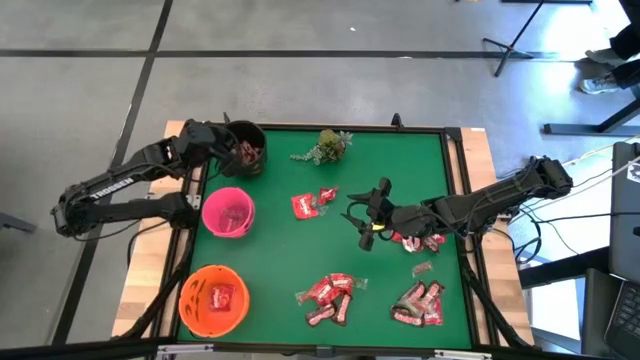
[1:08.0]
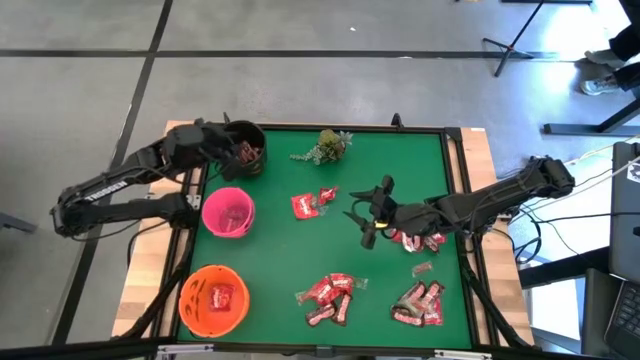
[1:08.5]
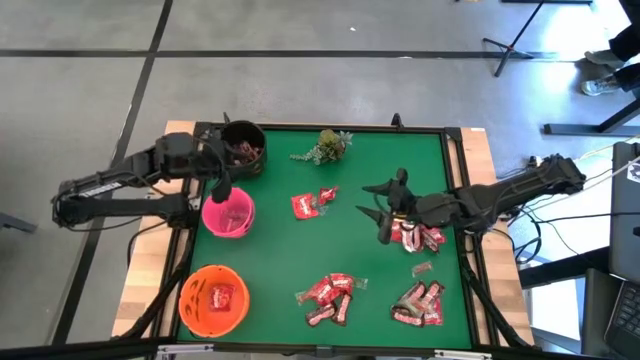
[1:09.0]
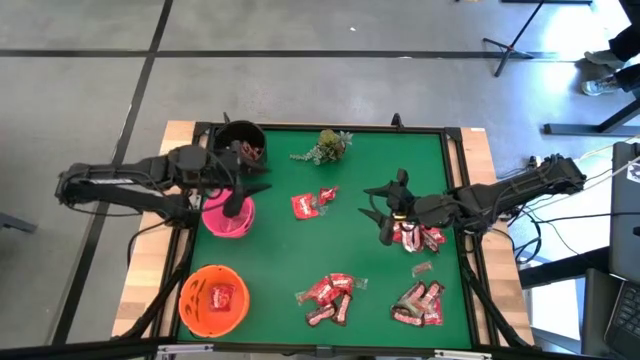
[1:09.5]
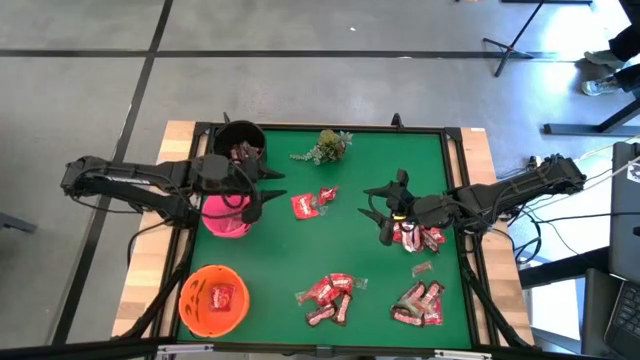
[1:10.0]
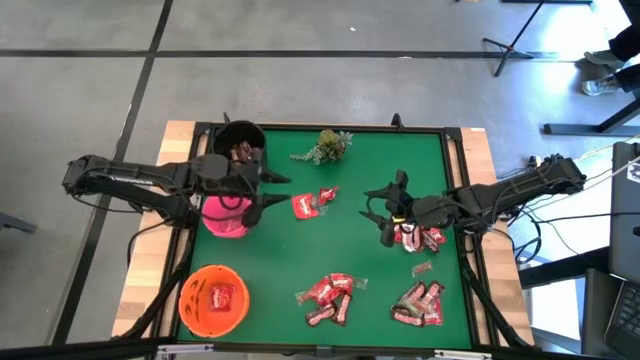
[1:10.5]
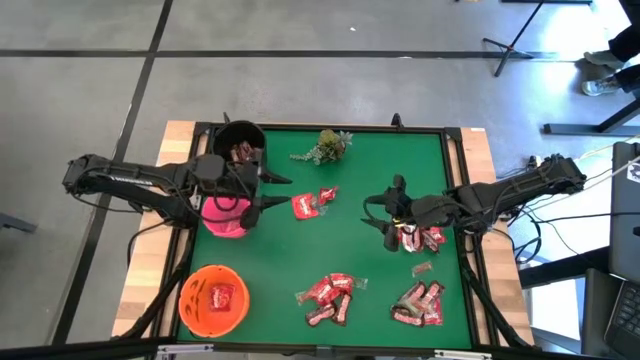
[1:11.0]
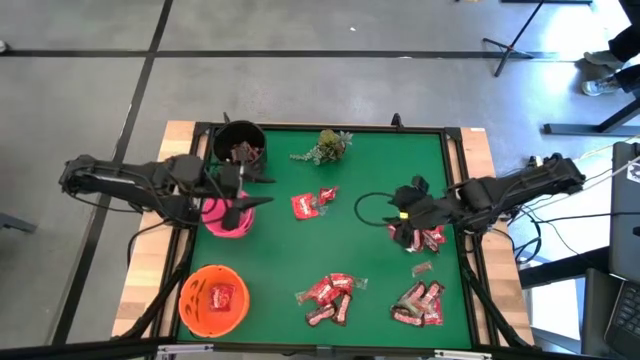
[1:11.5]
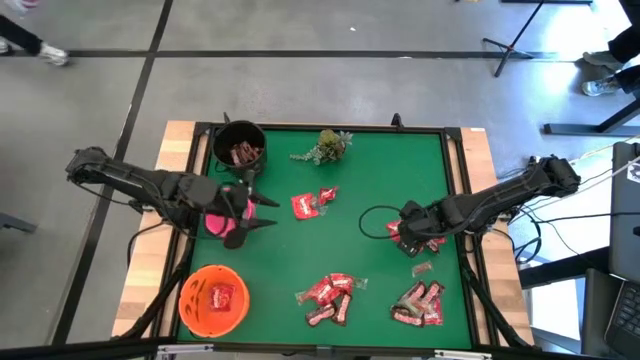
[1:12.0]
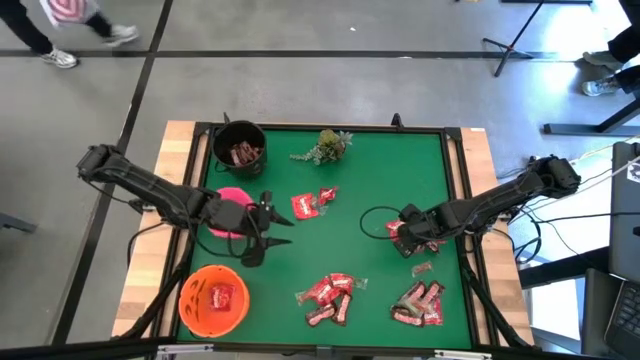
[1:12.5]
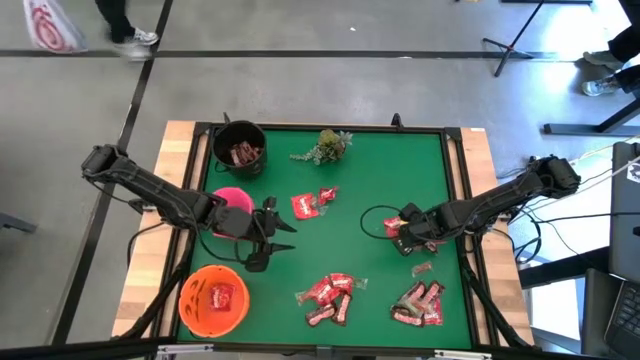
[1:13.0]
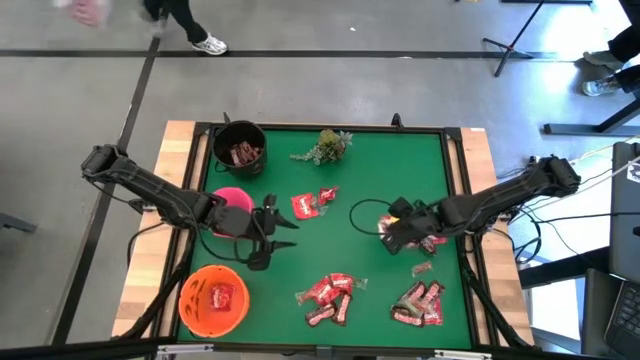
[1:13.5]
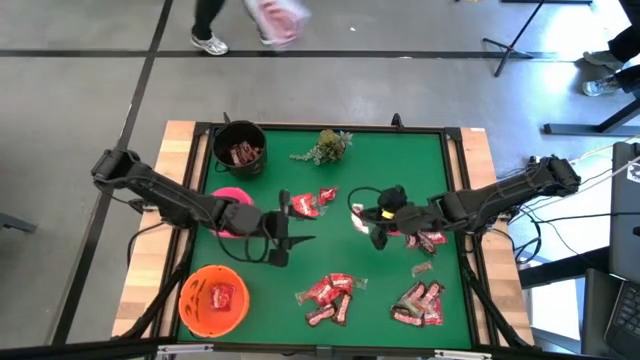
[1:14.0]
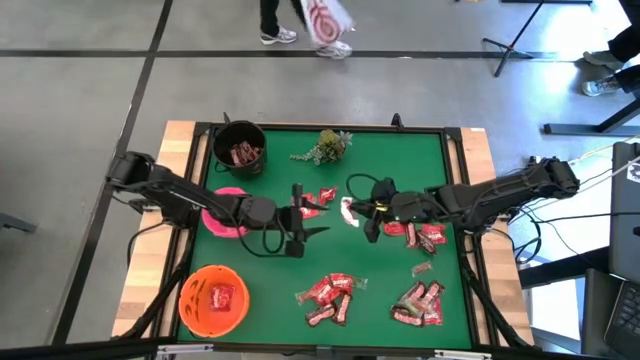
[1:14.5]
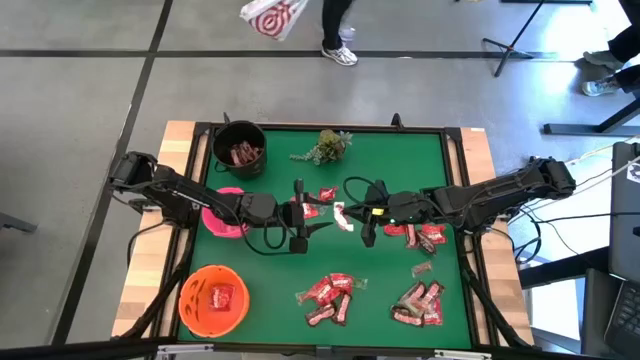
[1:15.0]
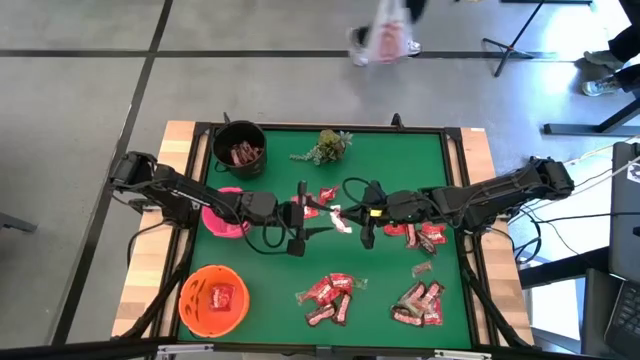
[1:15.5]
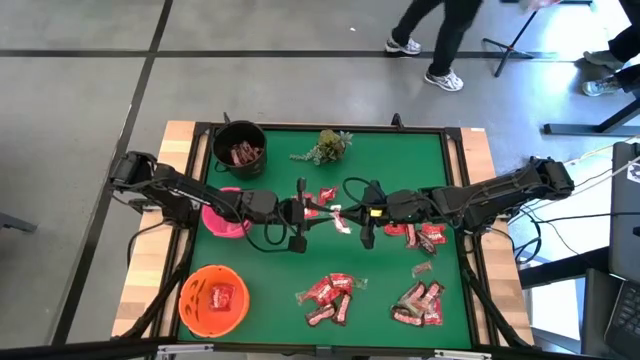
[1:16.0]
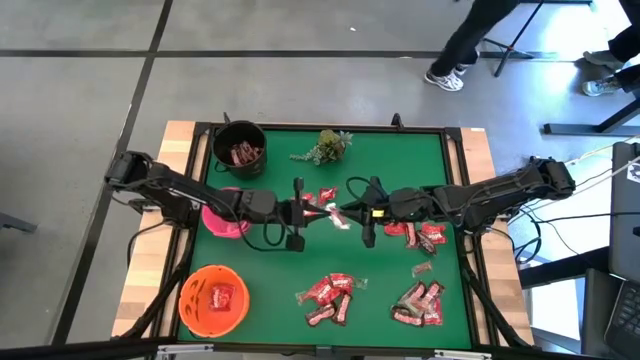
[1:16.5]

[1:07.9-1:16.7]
Task: Sort candy
Put the white chocolate into the black bucket

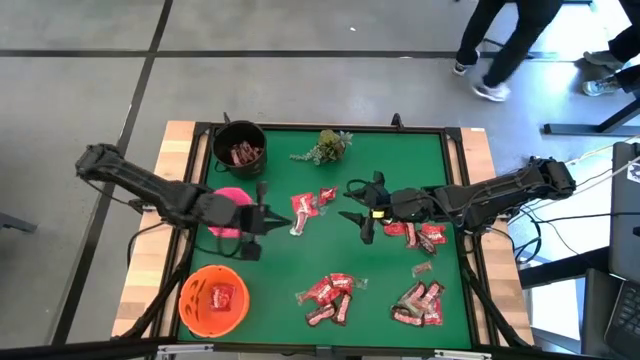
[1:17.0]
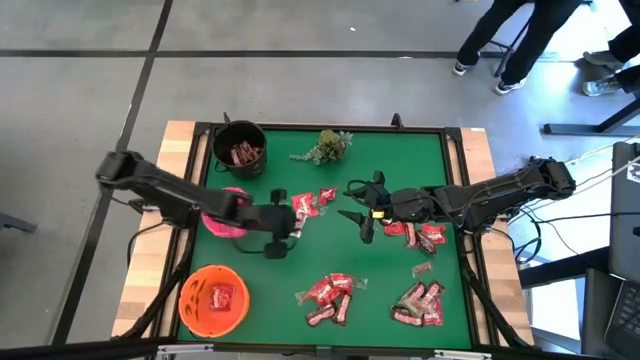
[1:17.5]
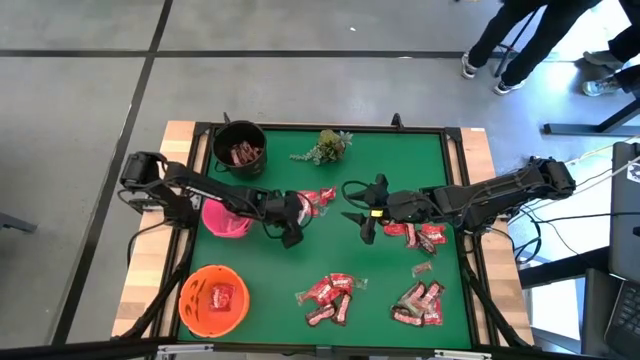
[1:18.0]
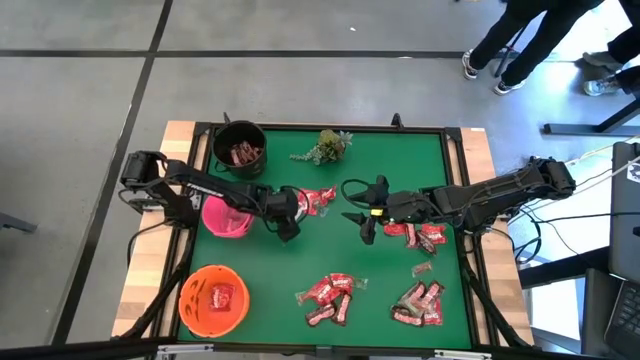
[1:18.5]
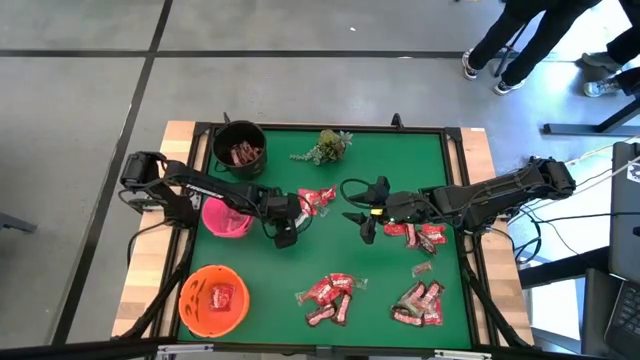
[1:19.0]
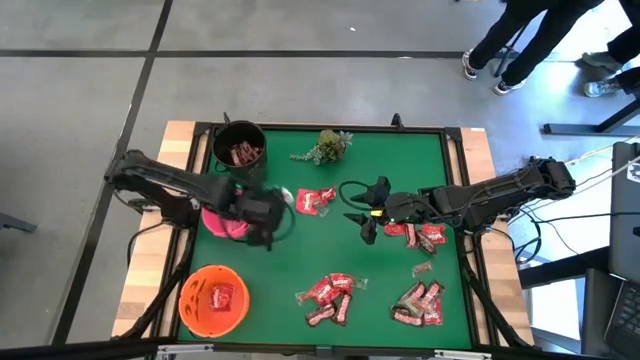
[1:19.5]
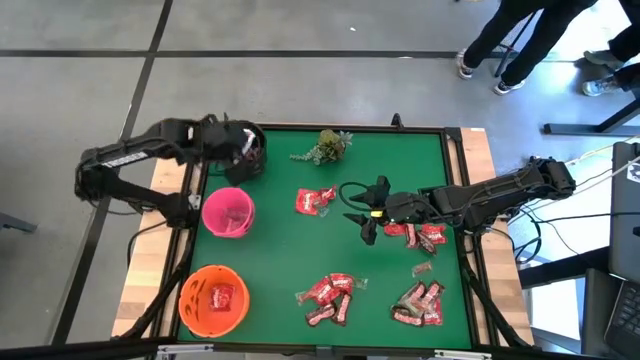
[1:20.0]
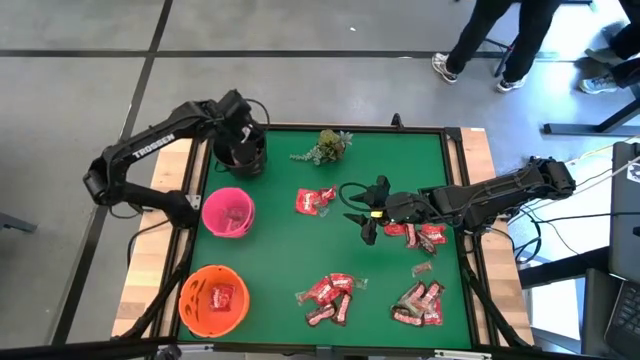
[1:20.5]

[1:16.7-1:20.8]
Put the white chocolate into the black bucket

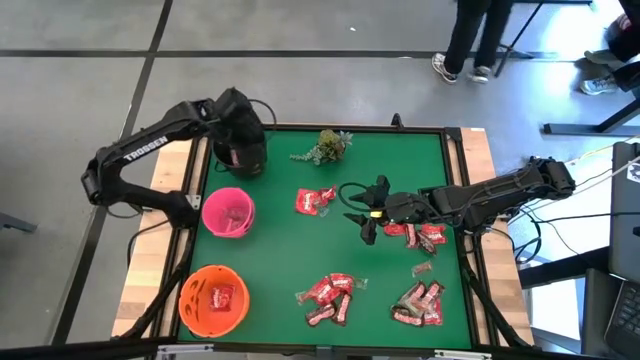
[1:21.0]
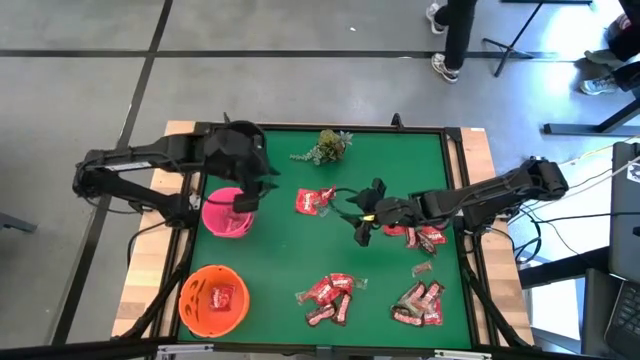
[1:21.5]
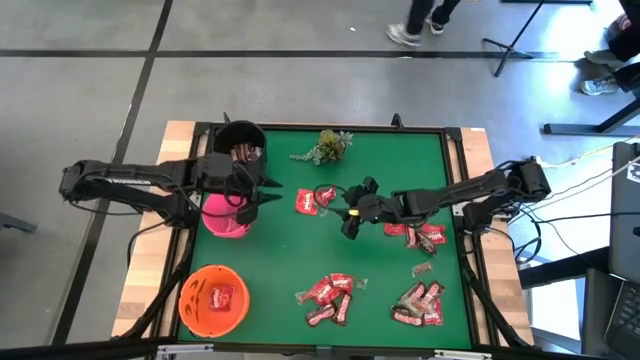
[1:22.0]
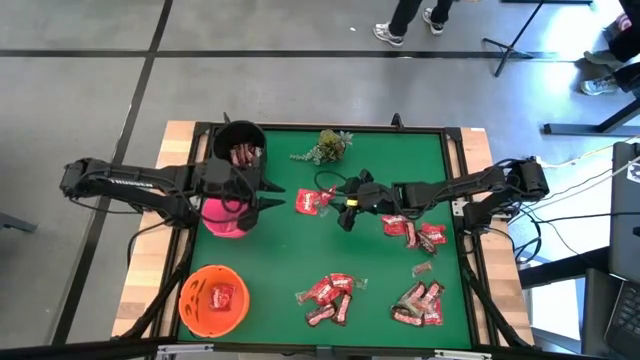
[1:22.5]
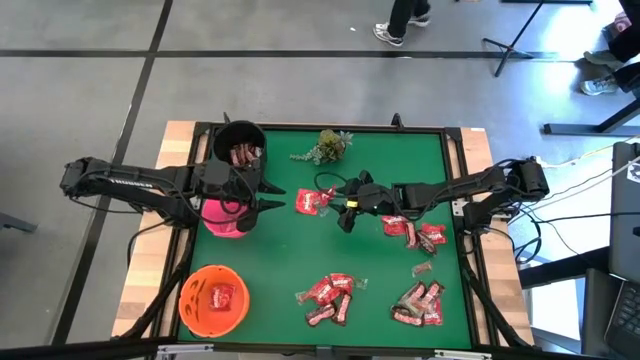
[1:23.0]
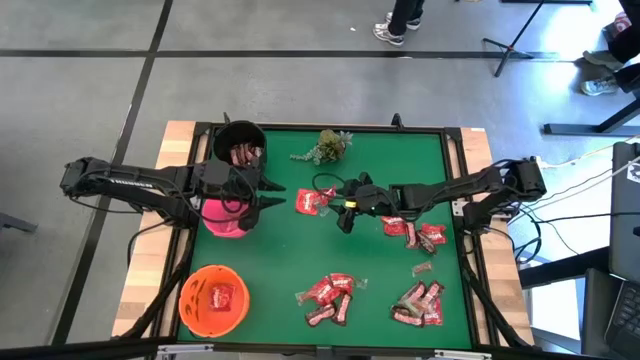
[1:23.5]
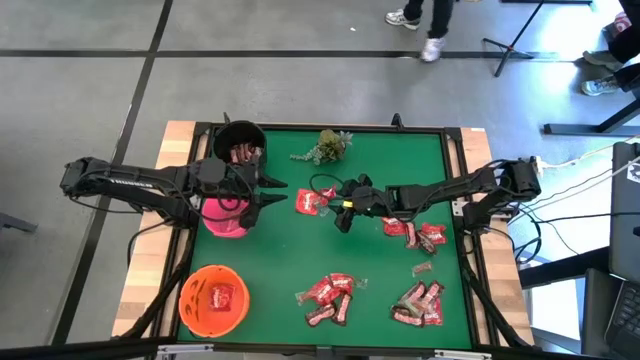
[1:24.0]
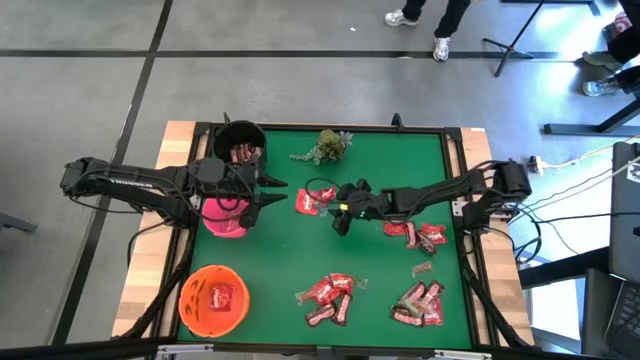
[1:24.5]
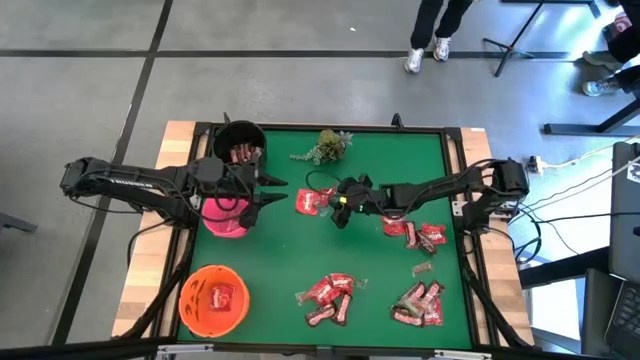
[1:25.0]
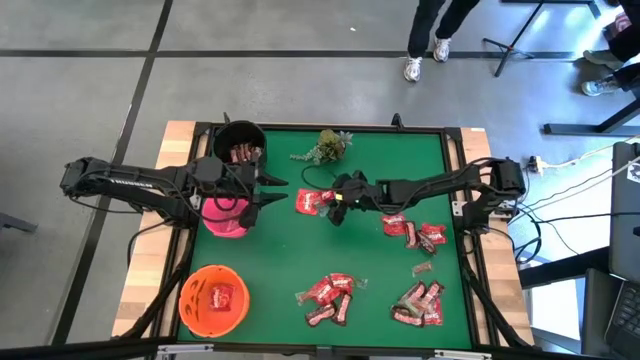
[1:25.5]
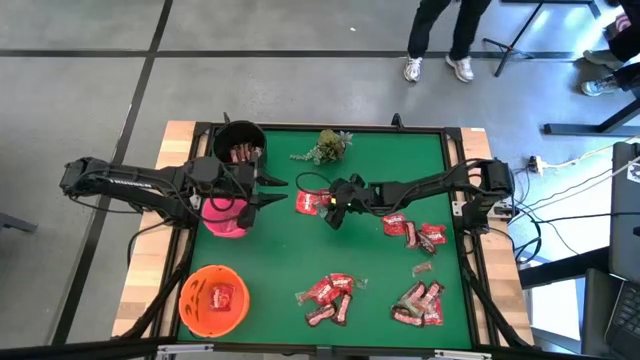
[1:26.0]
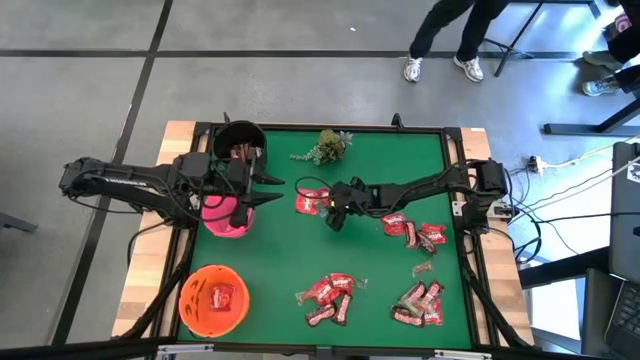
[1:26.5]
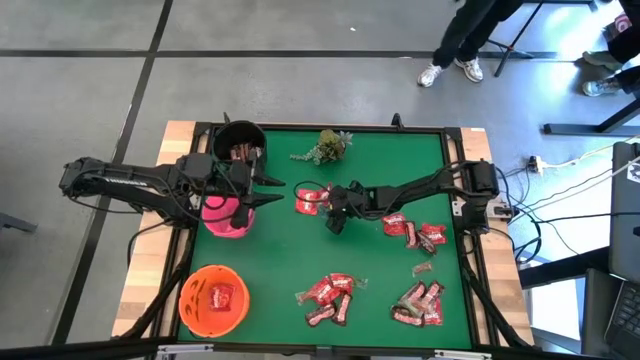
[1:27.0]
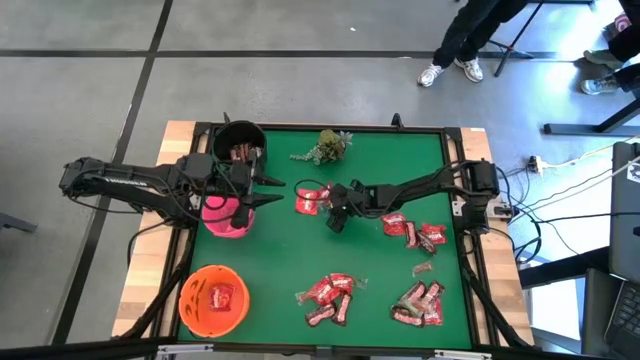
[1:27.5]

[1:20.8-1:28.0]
Put the blue gummy into the pink bucket

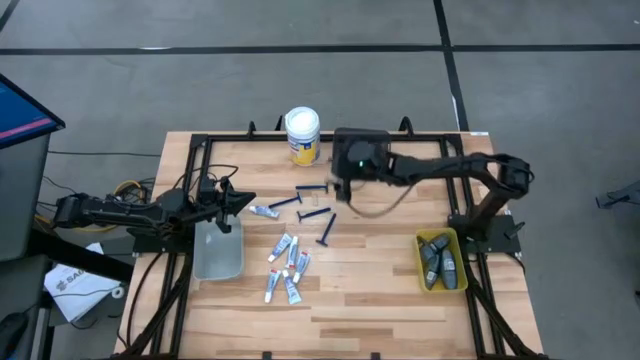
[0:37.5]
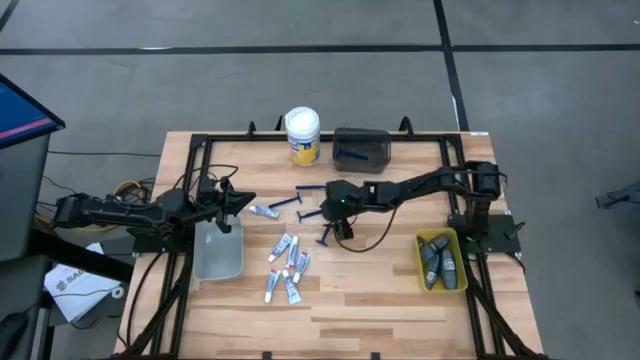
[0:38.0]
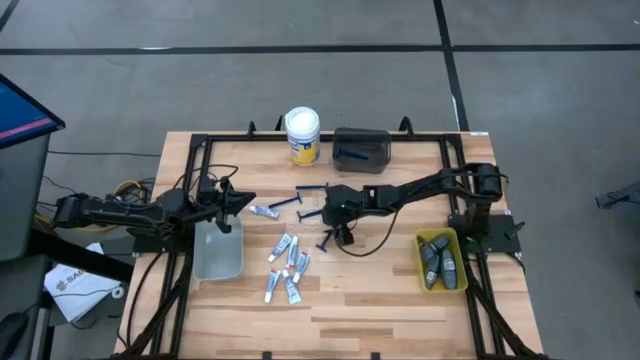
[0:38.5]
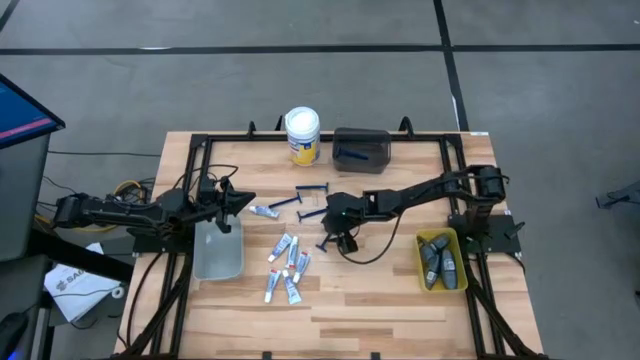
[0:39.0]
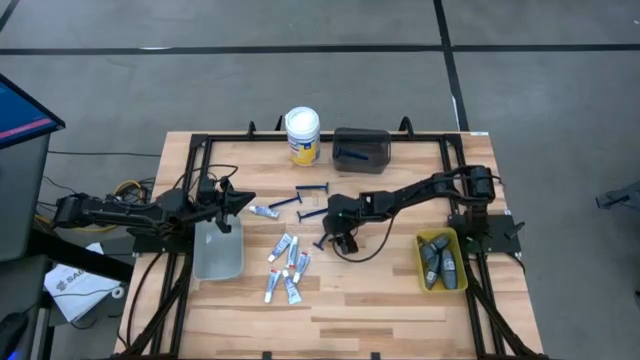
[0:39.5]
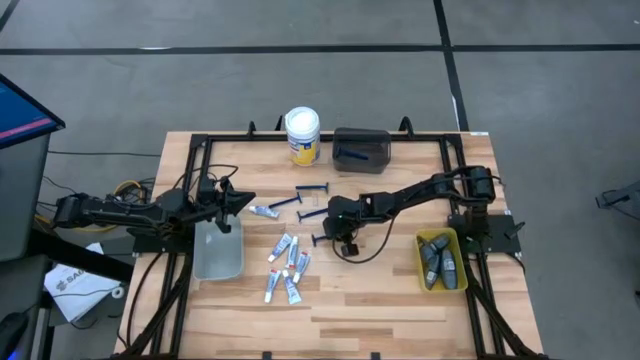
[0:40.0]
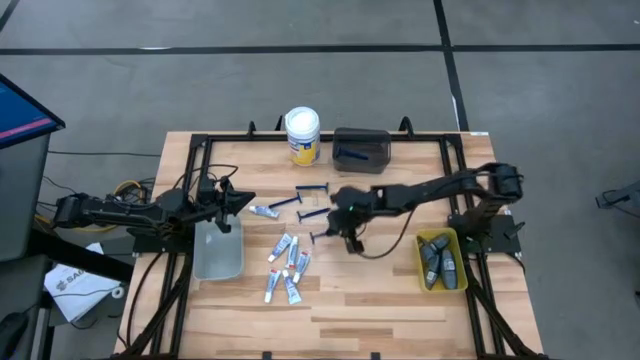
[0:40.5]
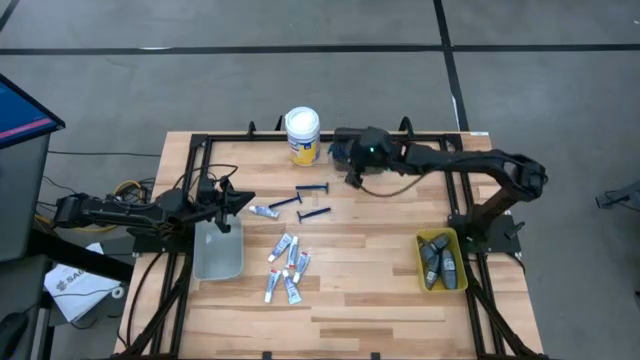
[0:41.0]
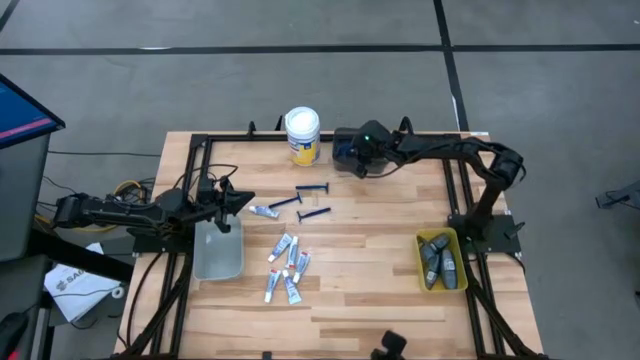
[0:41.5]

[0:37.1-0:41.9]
Task: Pick & Place Travel size toiletries
Put the blue razor into the black bin
